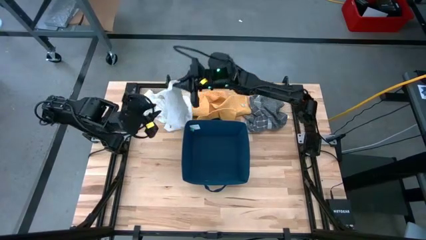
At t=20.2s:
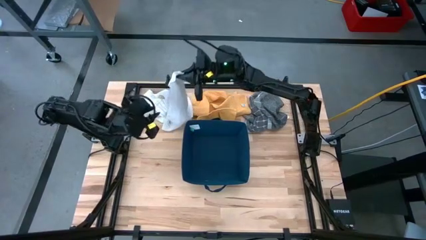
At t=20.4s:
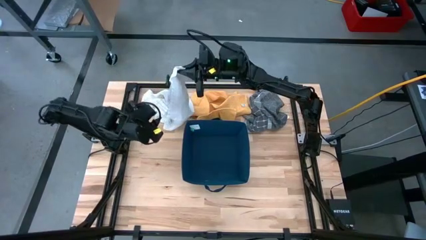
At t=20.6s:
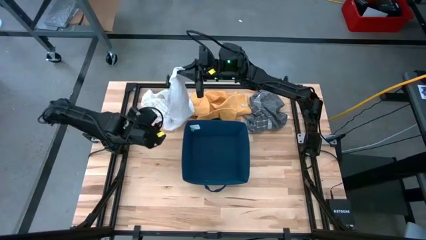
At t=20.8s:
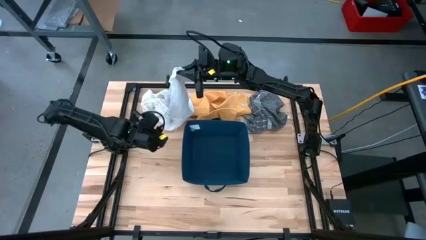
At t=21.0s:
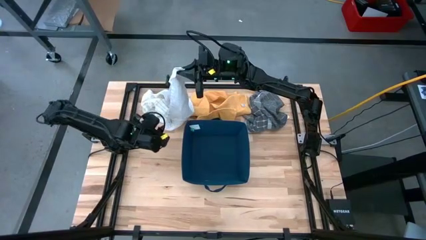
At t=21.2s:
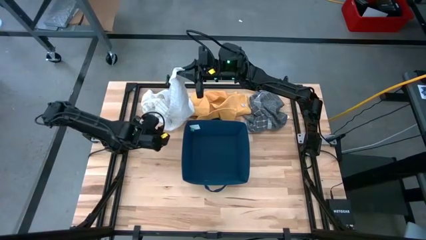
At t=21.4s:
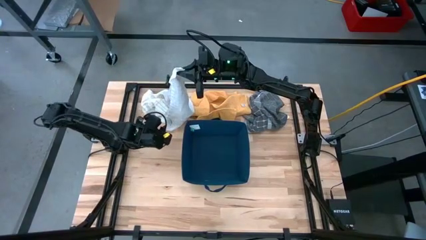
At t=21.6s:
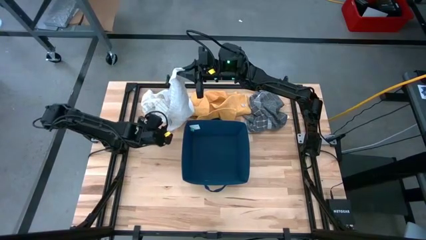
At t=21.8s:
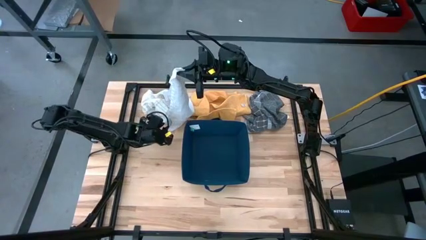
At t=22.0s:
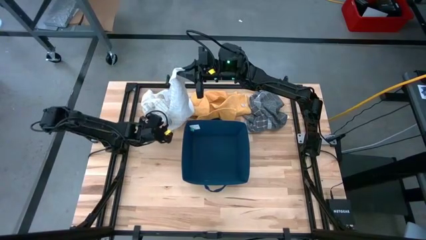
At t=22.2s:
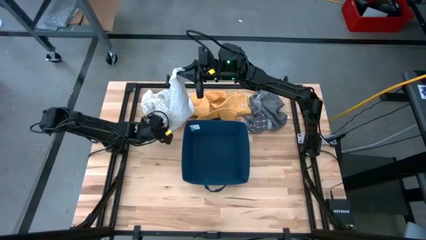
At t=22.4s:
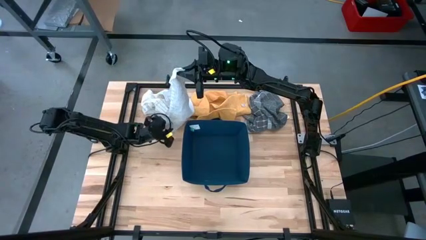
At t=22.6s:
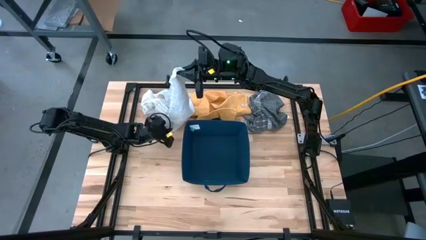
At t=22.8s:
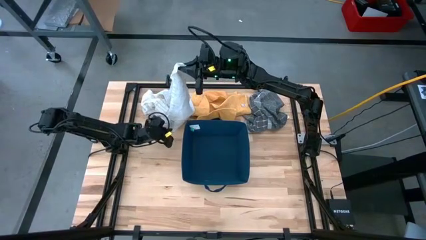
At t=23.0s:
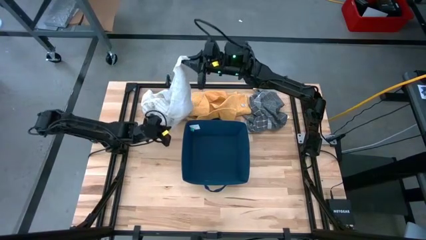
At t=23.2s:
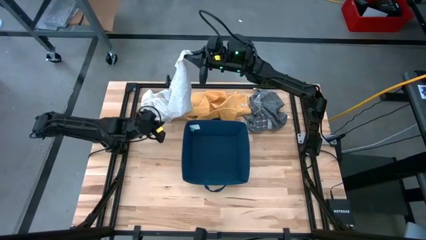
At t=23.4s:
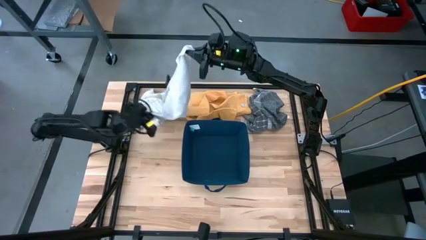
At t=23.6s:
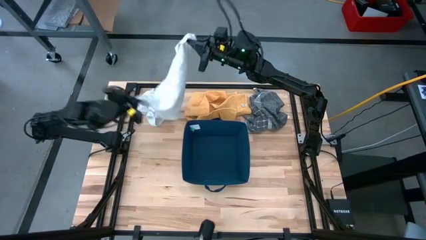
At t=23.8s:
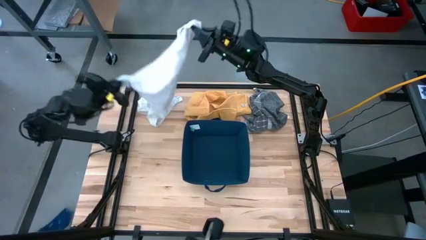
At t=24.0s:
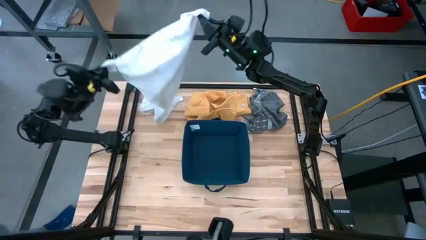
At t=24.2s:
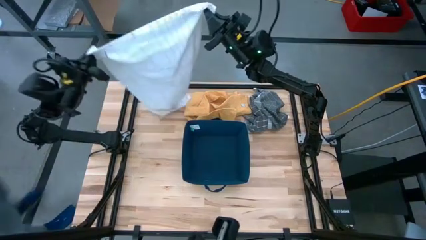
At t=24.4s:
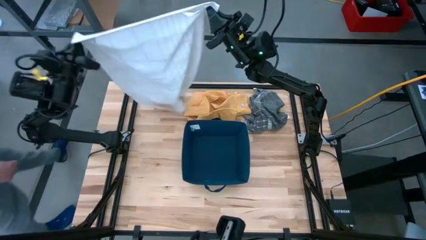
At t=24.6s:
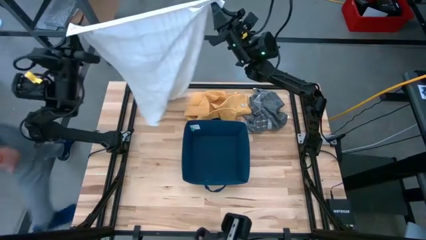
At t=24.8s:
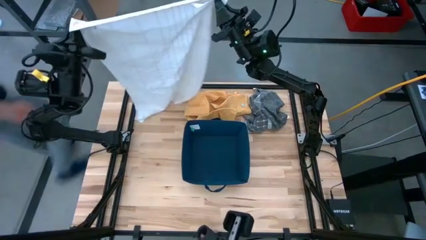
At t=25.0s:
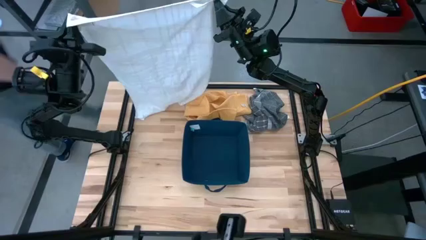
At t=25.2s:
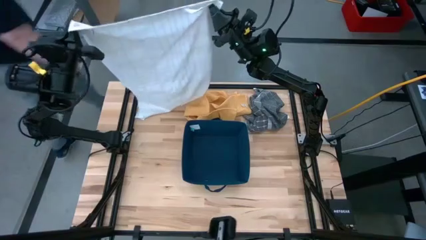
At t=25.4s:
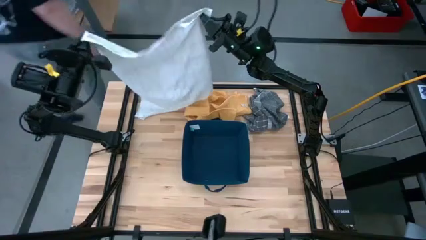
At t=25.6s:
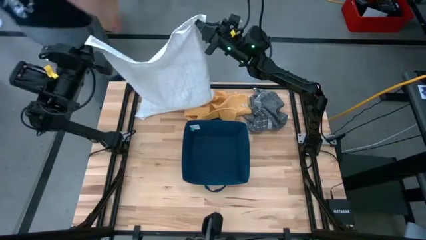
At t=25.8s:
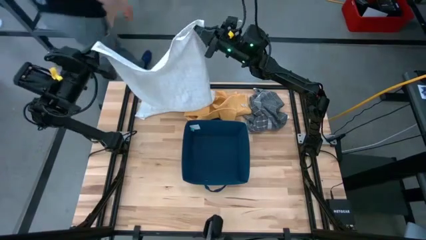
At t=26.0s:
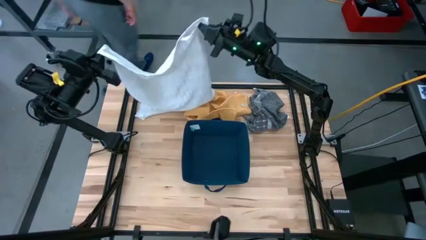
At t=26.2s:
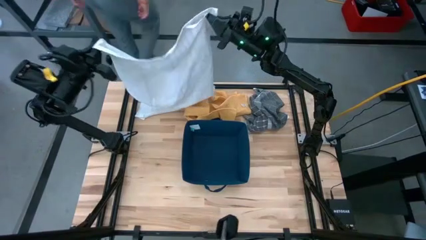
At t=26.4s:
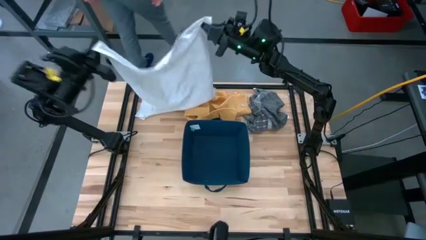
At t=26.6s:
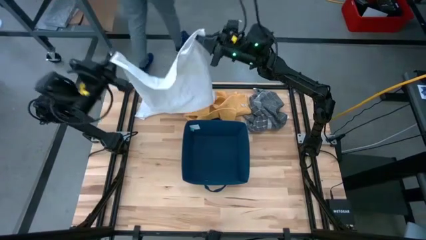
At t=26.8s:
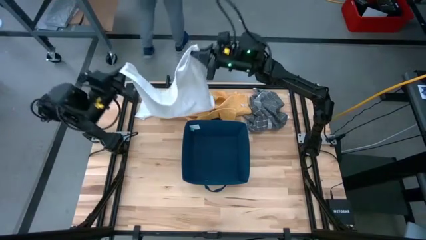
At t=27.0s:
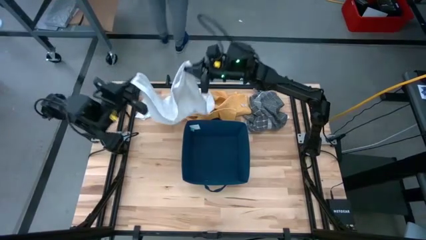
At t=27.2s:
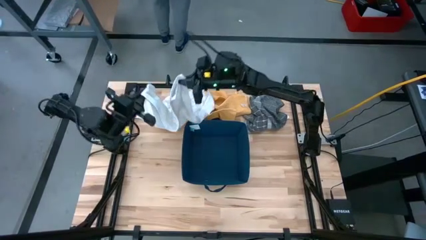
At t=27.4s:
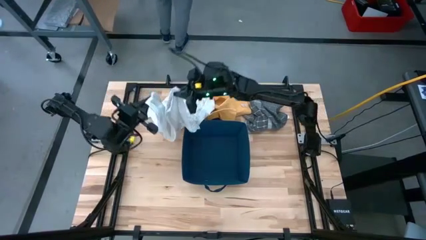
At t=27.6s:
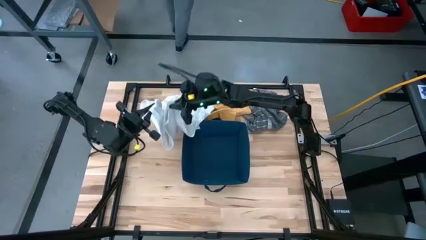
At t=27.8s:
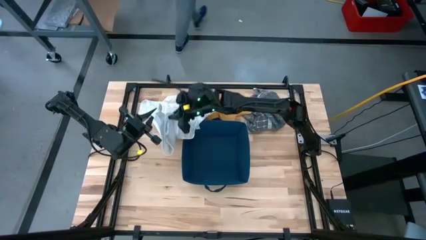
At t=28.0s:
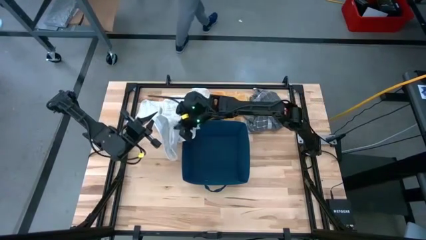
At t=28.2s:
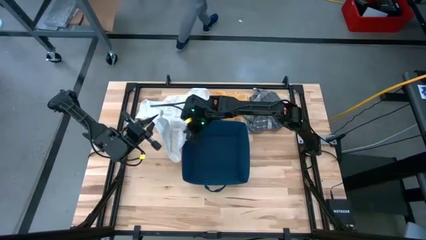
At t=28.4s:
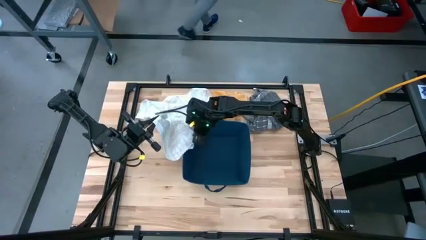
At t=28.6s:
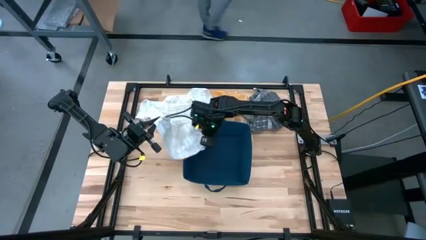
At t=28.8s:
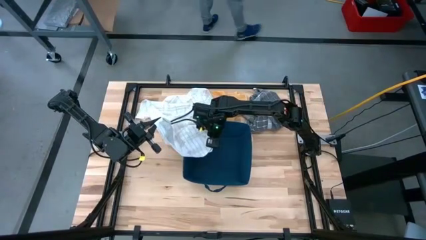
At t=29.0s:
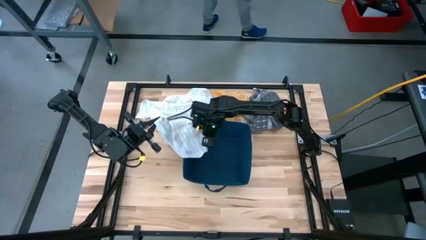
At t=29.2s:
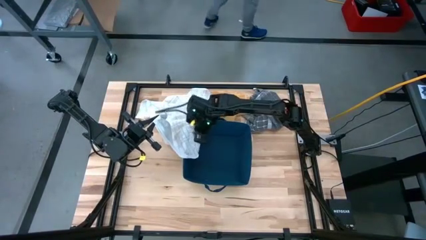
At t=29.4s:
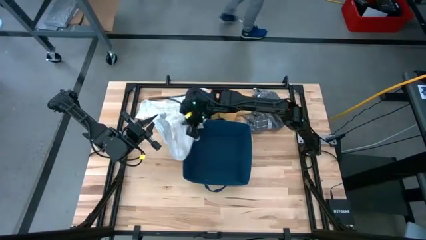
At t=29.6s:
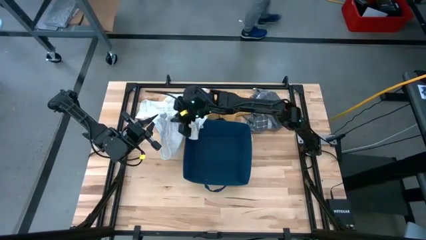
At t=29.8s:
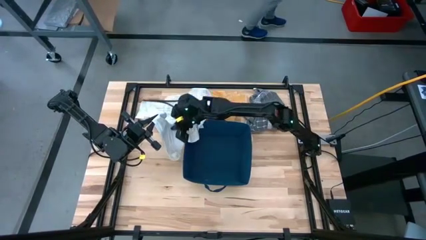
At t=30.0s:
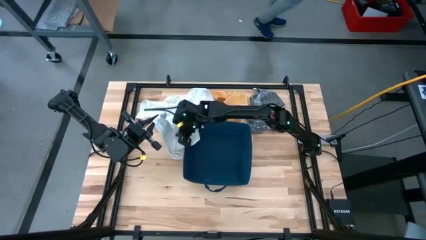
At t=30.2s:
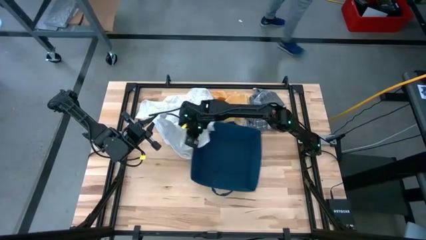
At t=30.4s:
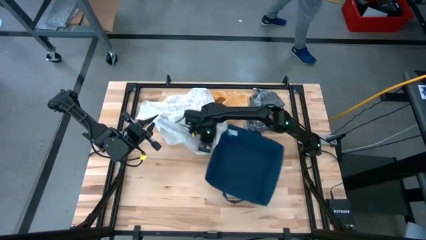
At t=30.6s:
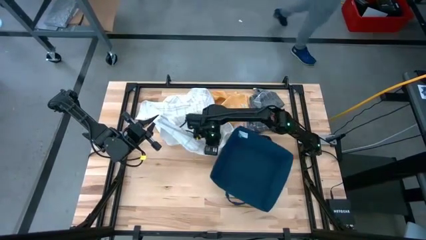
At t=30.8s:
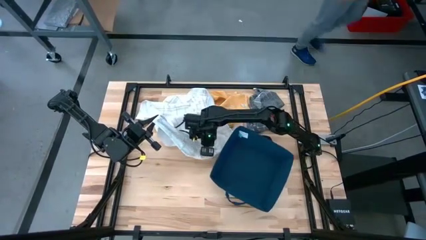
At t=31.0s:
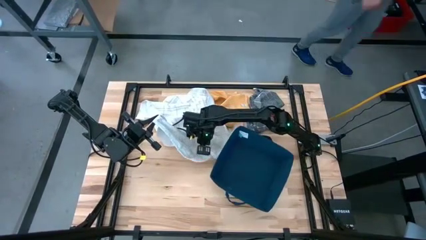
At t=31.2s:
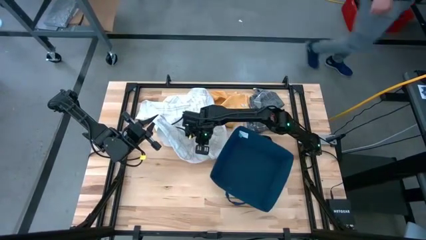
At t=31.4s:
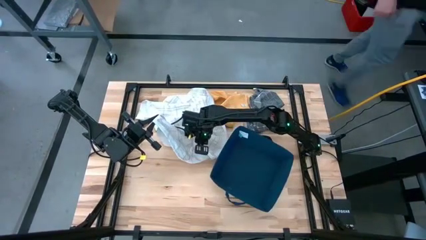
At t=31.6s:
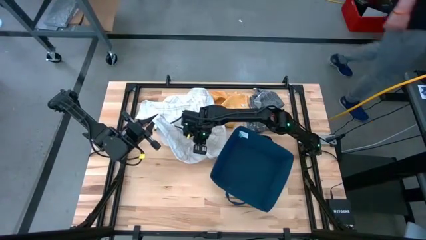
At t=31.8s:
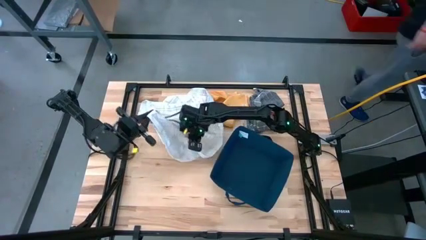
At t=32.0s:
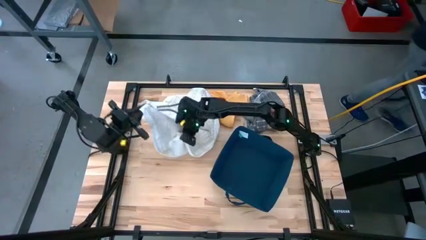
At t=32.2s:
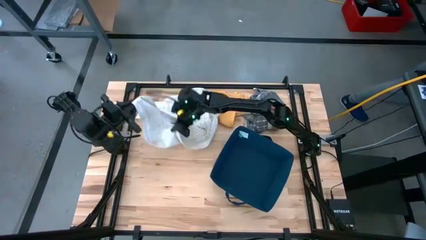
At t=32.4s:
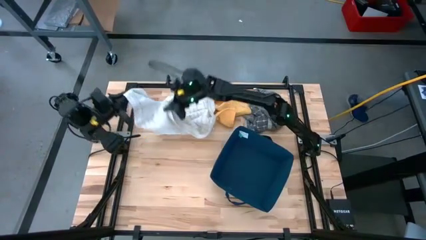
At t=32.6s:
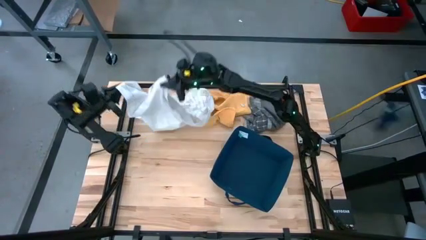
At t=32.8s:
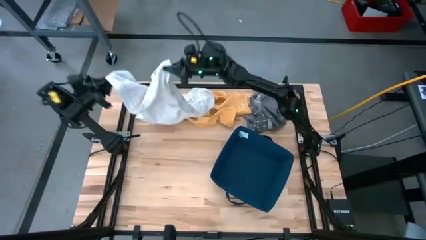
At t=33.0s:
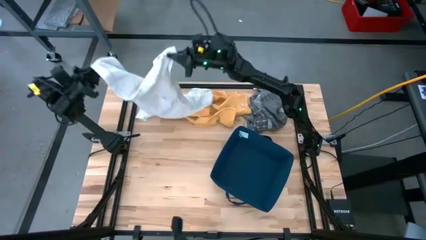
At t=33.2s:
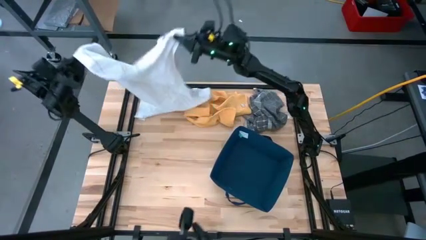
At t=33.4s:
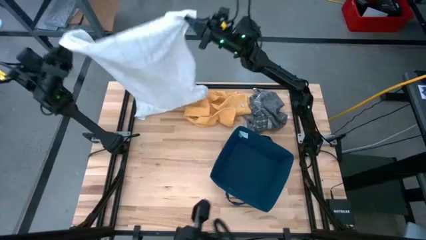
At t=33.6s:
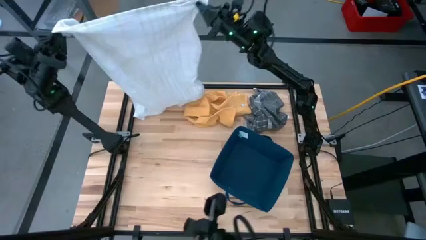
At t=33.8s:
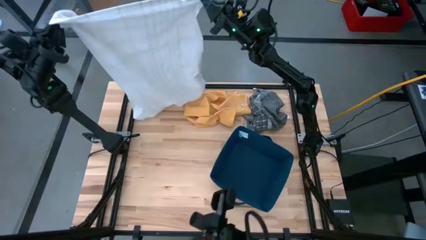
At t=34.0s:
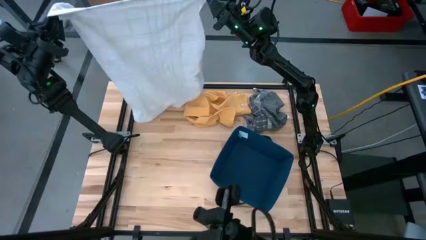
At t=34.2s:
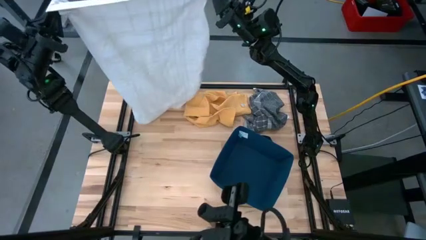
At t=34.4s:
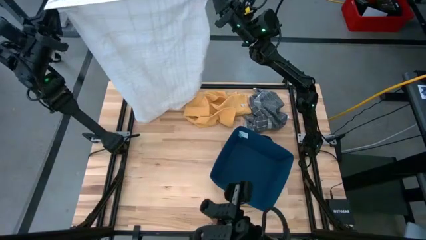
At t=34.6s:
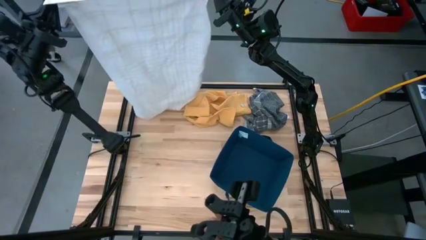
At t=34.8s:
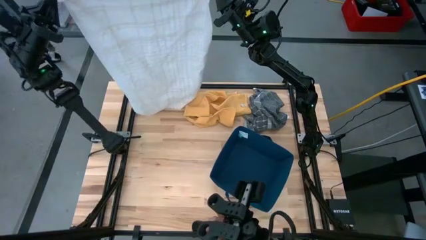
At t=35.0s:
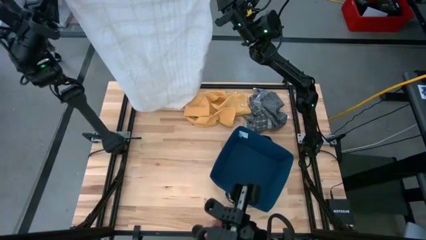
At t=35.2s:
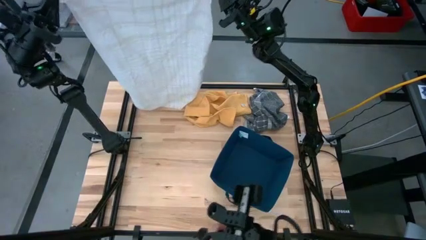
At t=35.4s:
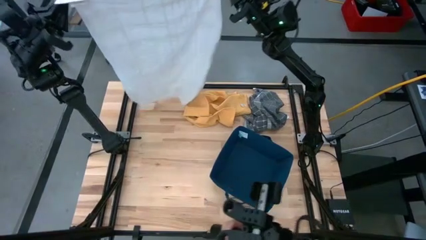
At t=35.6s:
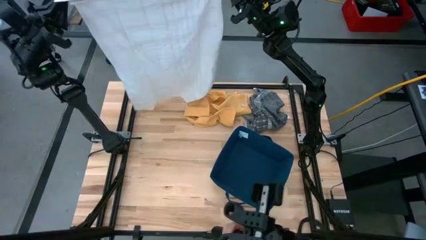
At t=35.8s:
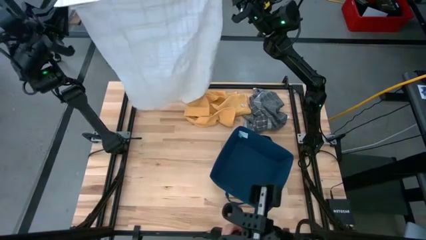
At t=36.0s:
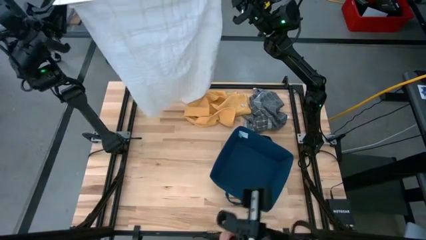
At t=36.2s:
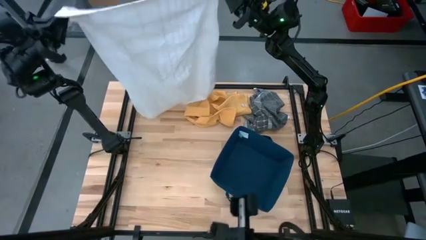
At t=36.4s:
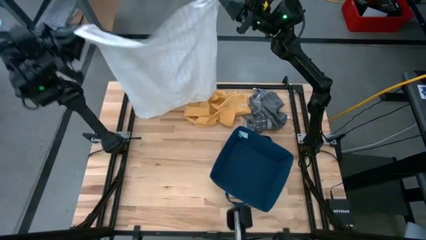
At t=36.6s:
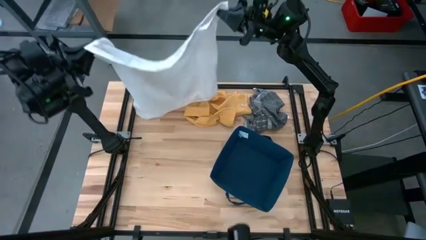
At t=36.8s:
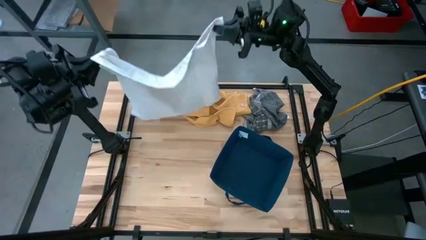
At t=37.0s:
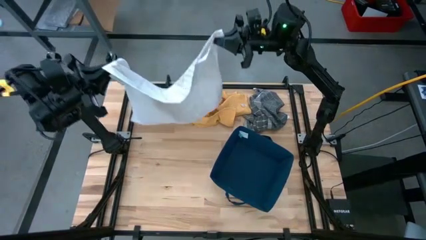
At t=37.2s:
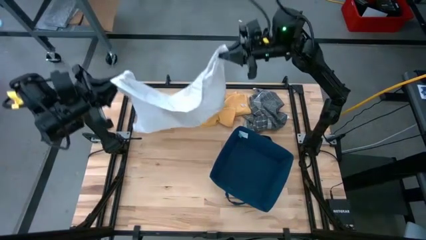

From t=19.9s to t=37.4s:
Task: Fold towel
Fold the white towel
